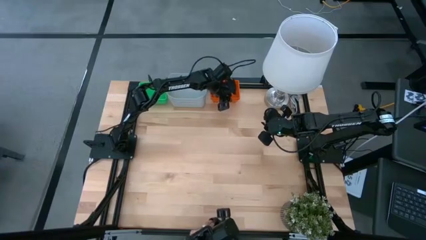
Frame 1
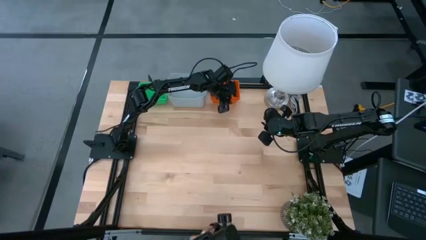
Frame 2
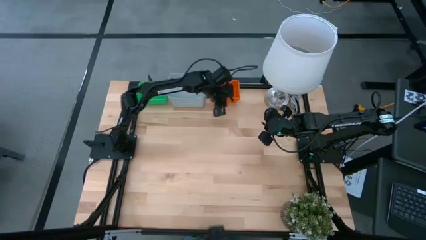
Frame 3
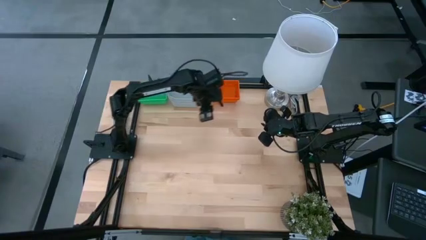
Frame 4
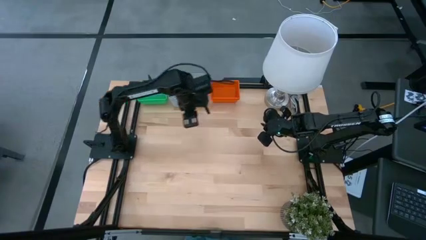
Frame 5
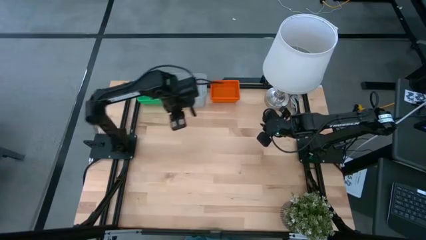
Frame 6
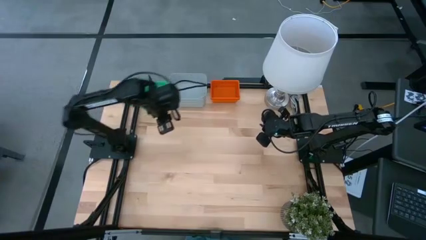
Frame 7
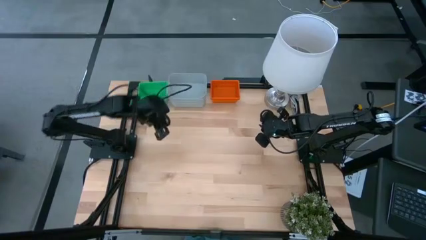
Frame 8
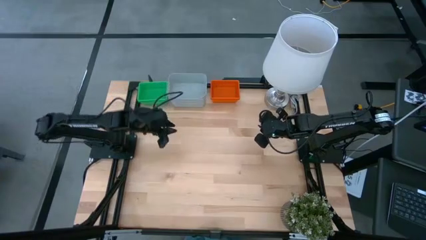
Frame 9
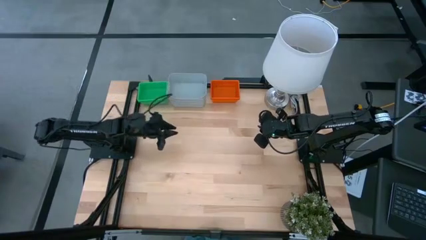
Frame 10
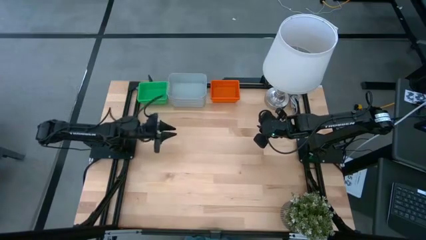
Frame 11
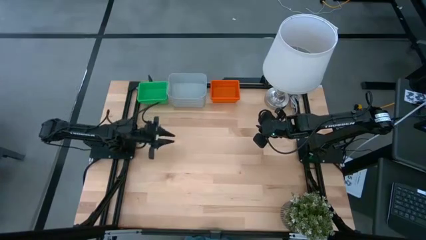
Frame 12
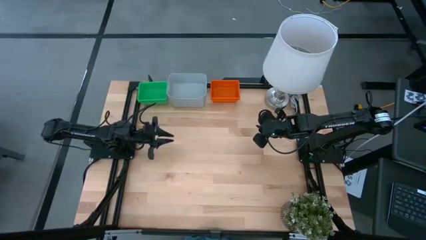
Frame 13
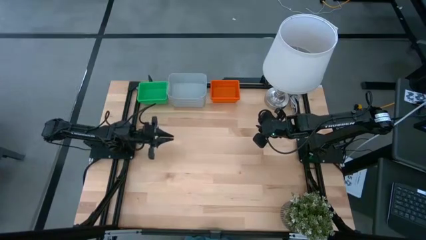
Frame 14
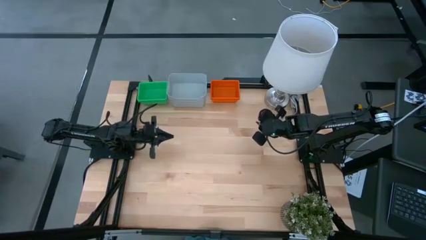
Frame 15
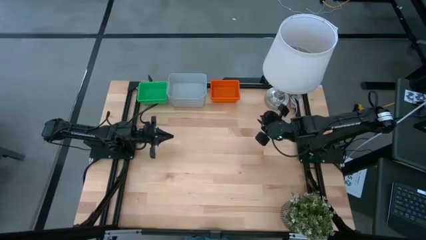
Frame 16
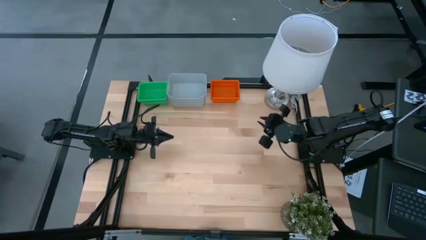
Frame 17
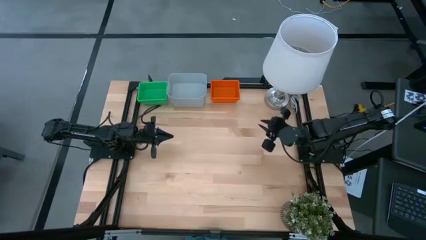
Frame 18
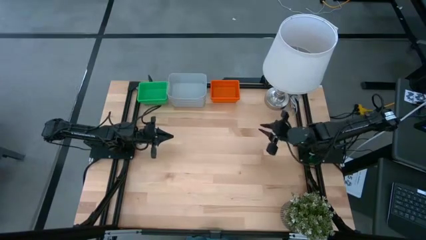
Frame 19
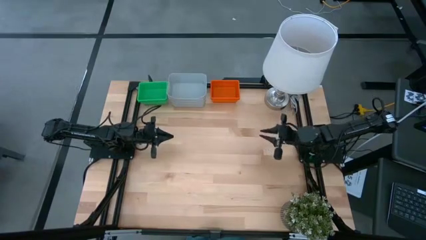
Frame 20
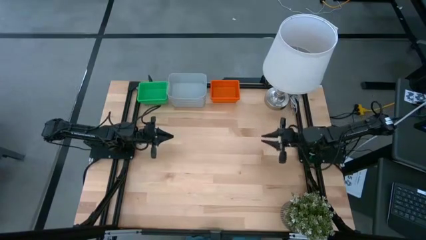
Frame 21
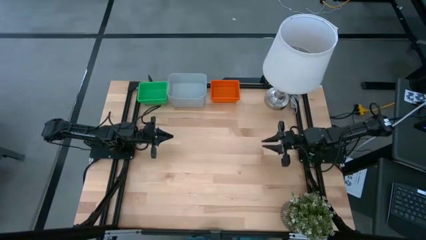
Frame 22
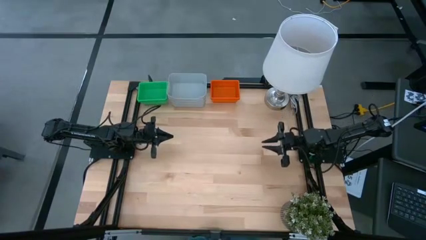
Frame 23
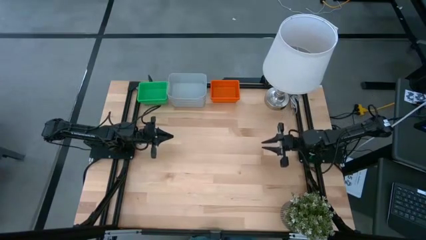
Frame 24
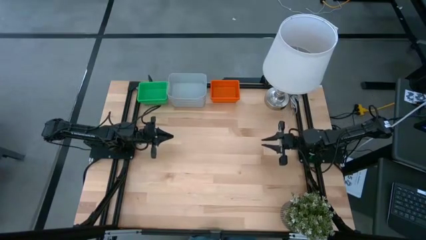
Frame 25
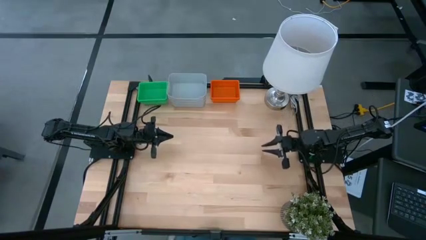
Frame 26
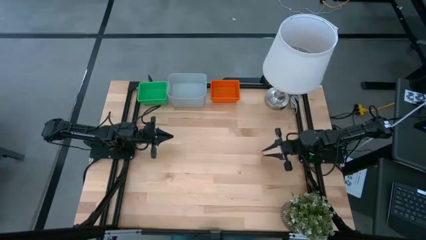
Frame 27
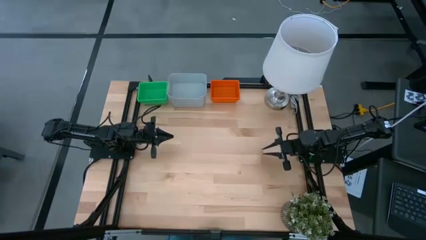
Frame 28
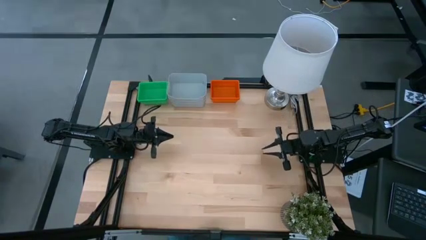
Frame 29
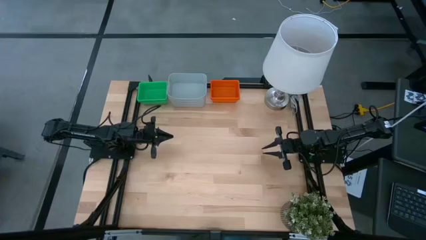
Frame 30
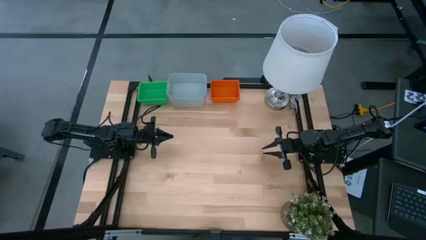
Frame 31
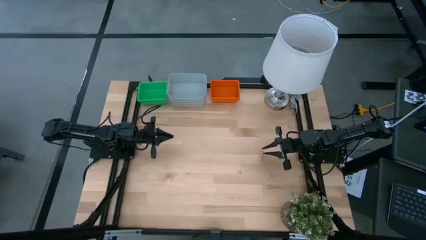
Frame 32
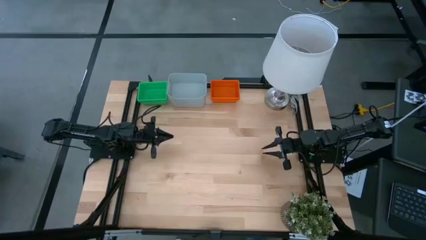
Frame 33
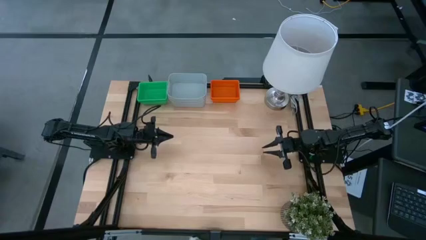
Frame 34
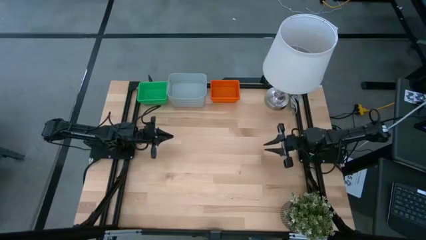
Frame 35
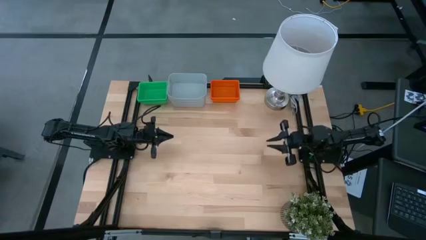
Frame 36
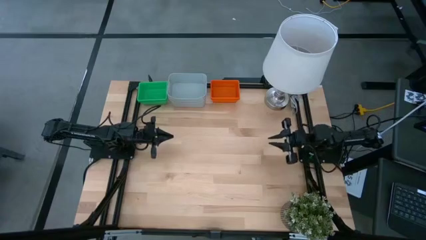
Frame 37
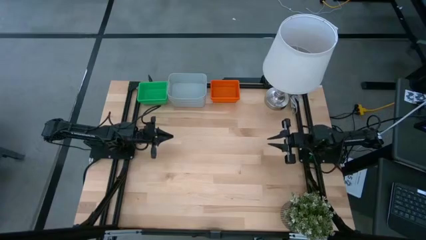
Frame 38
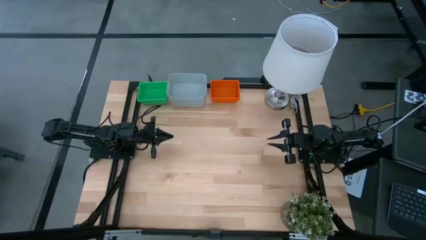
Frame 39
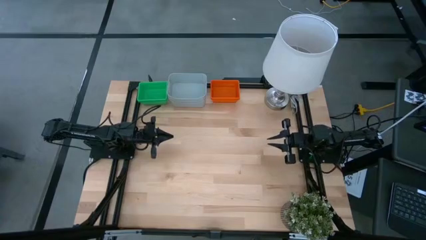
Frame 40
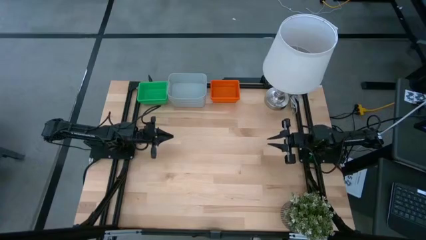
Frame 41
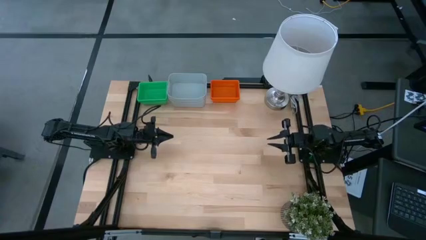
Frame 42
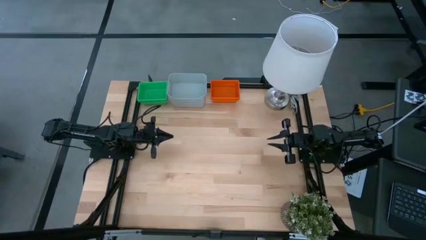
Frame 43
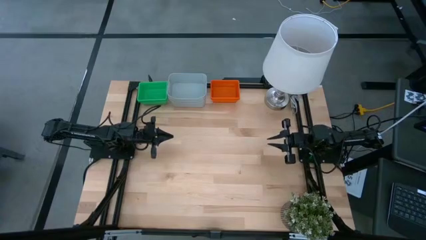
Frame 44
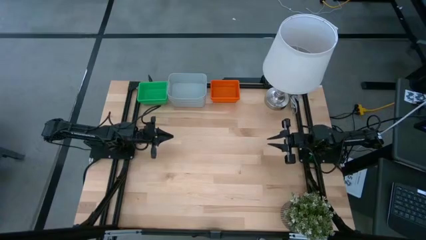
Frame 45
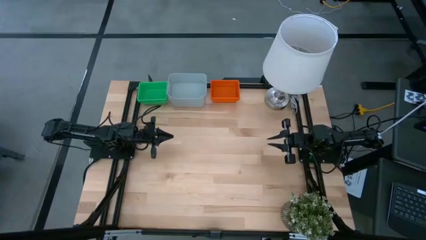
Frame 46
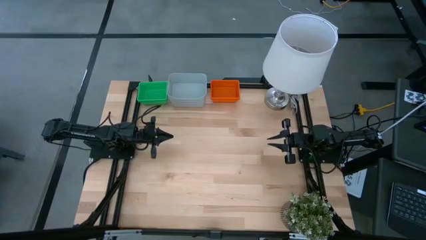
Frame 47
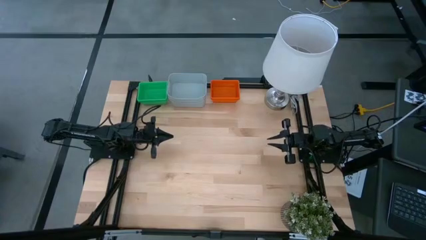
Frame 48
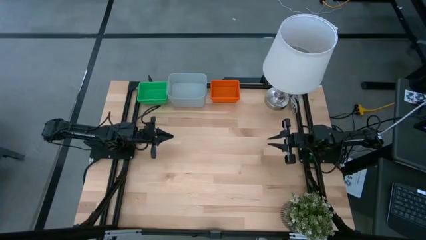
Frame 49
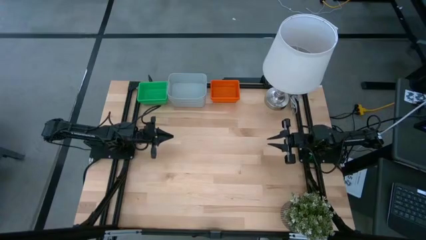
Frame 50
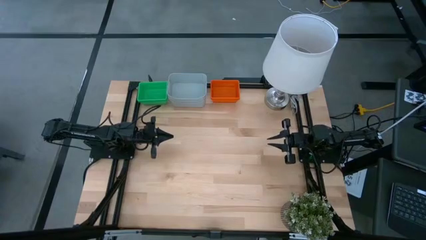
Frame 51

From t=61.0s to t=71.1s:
Return to Home Position
